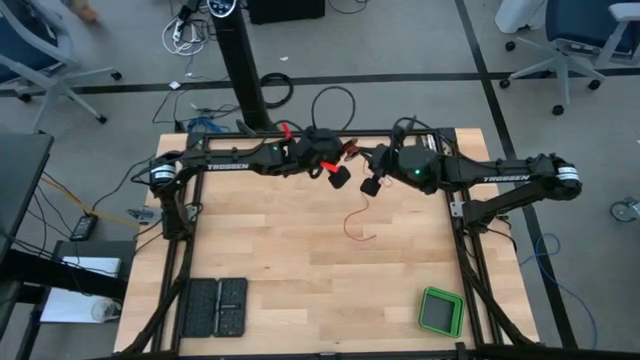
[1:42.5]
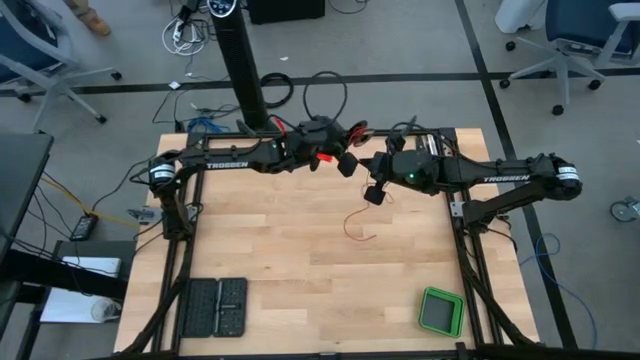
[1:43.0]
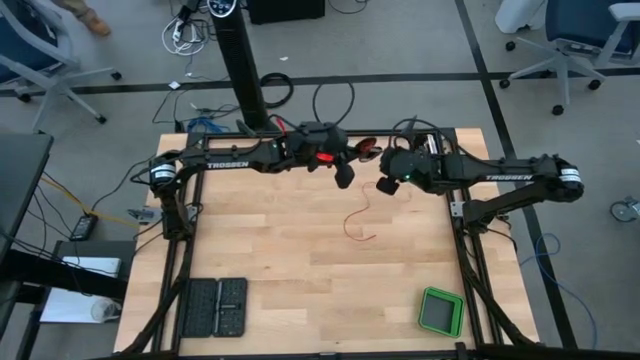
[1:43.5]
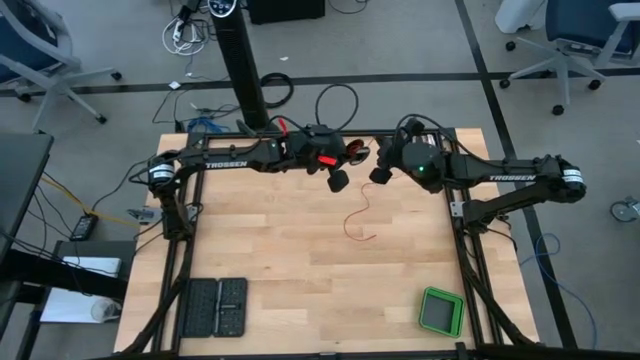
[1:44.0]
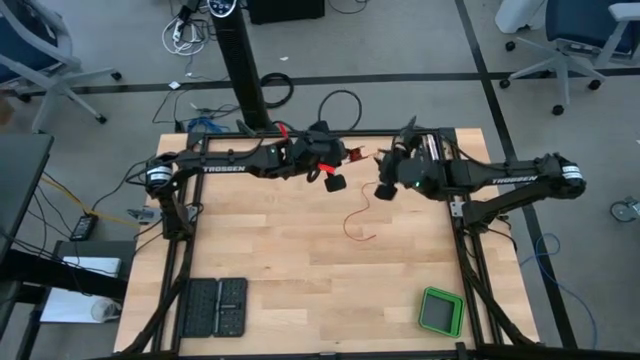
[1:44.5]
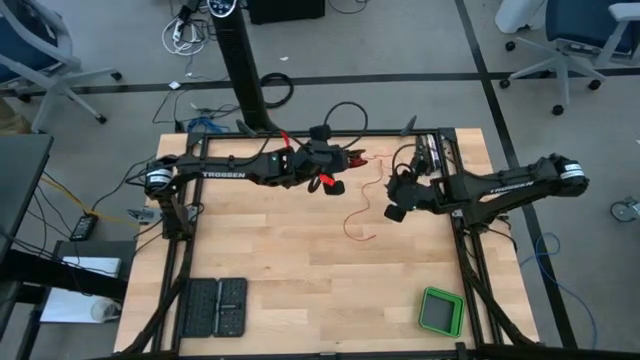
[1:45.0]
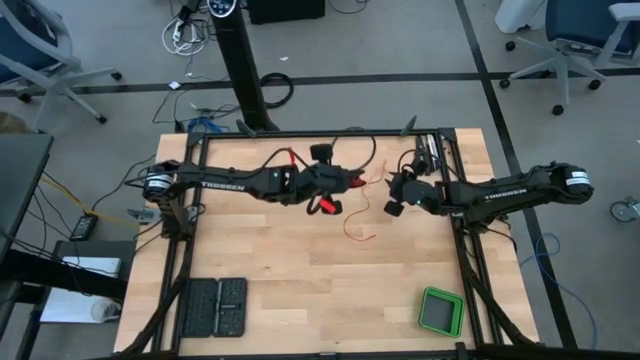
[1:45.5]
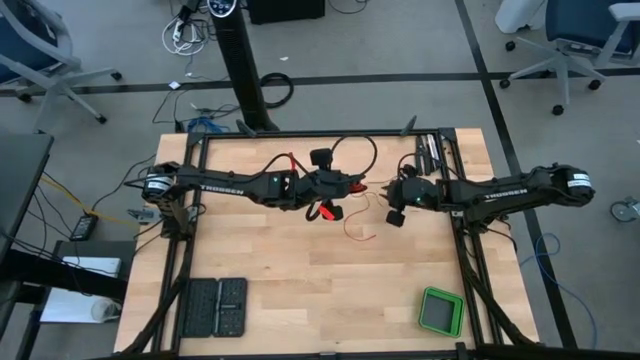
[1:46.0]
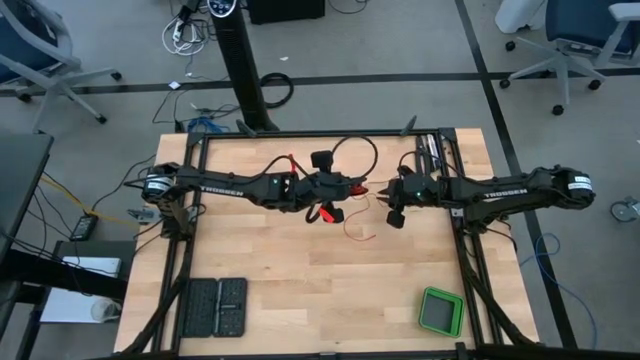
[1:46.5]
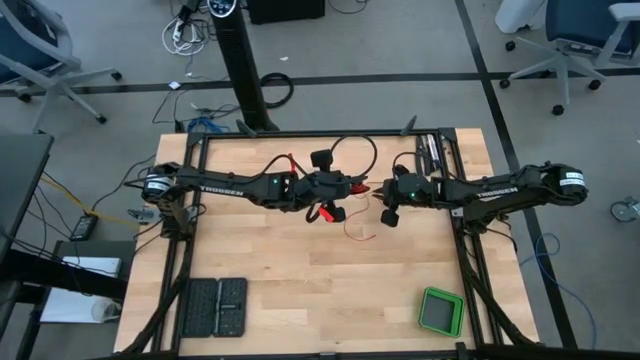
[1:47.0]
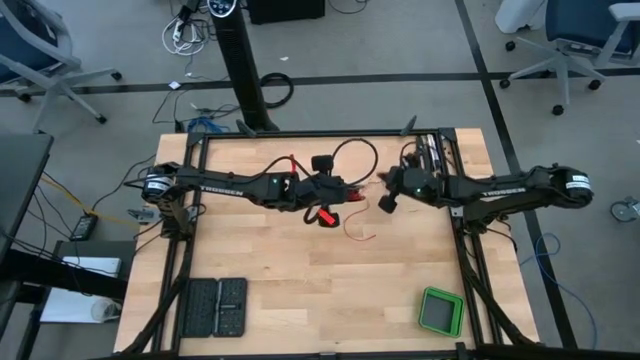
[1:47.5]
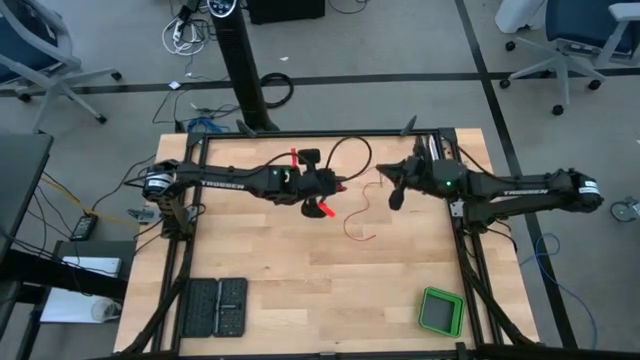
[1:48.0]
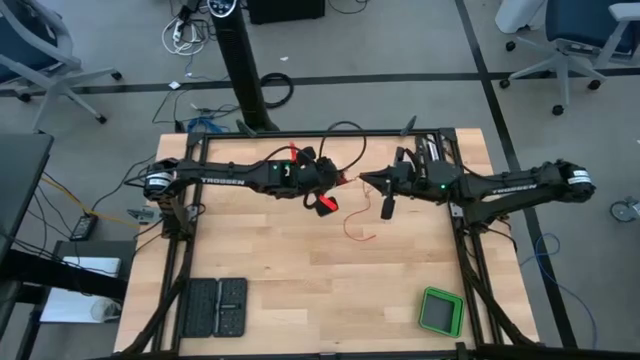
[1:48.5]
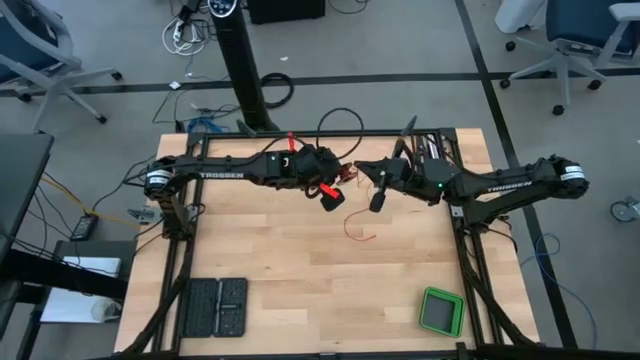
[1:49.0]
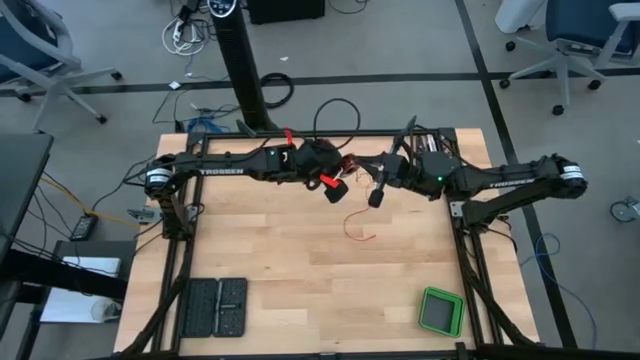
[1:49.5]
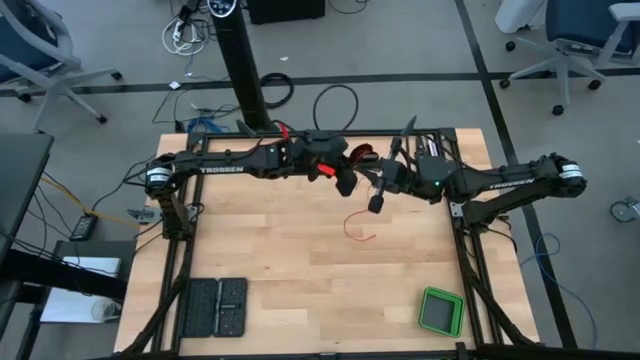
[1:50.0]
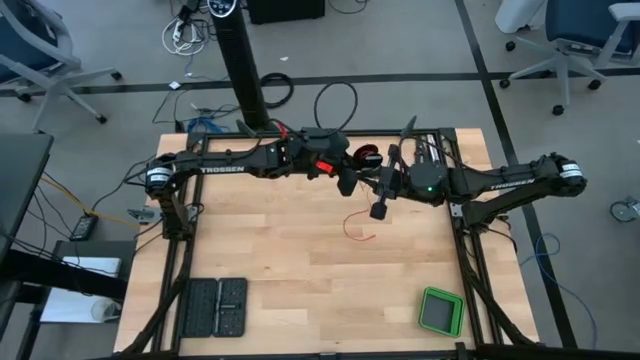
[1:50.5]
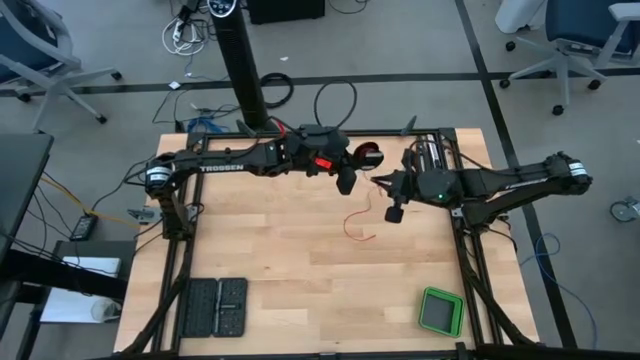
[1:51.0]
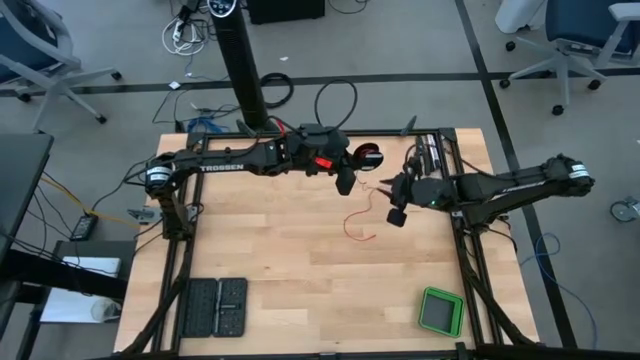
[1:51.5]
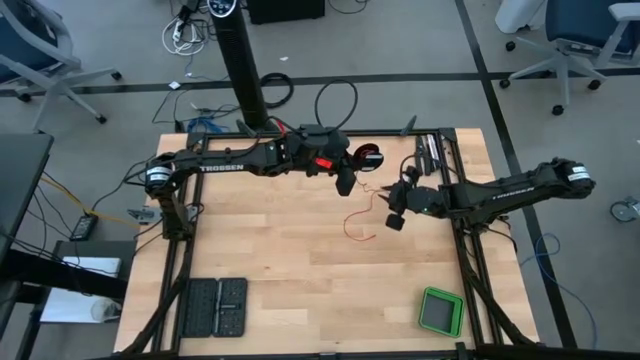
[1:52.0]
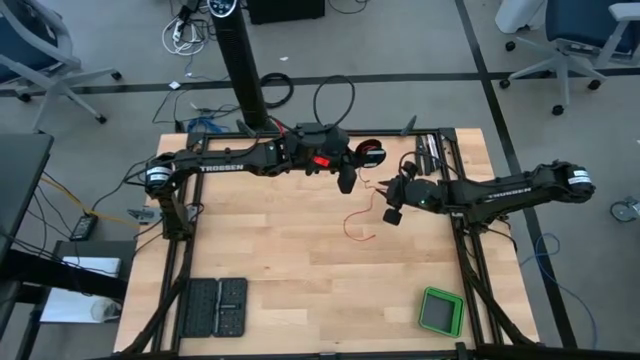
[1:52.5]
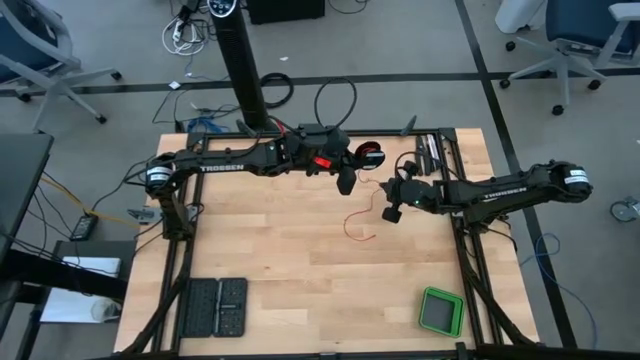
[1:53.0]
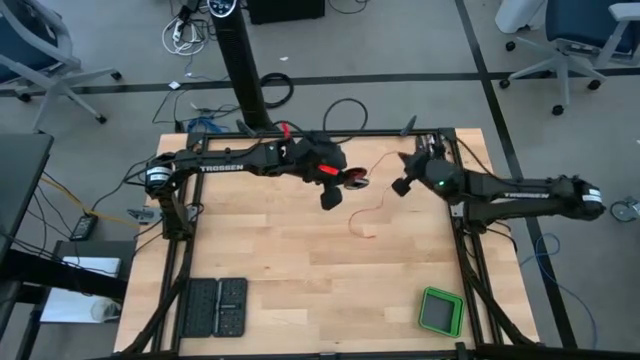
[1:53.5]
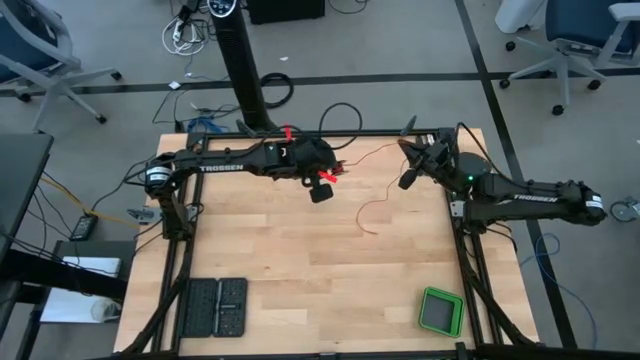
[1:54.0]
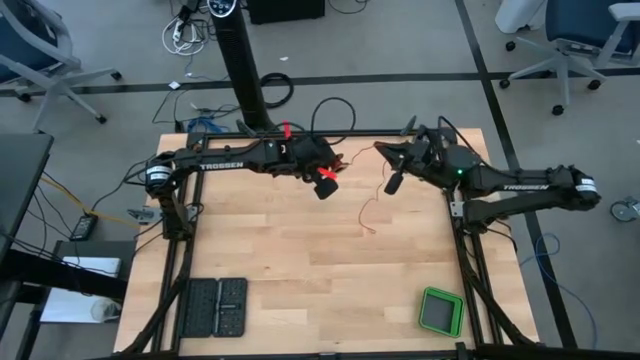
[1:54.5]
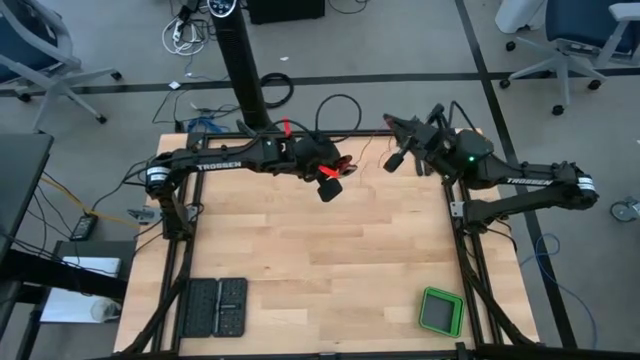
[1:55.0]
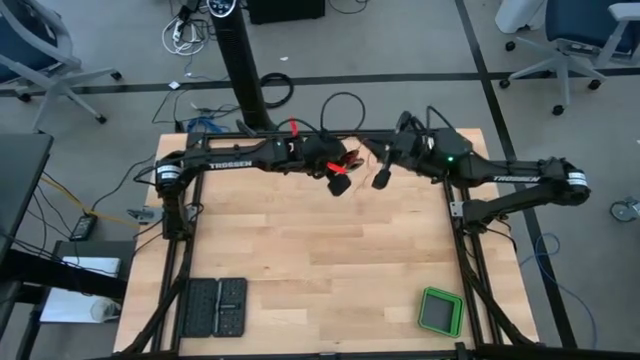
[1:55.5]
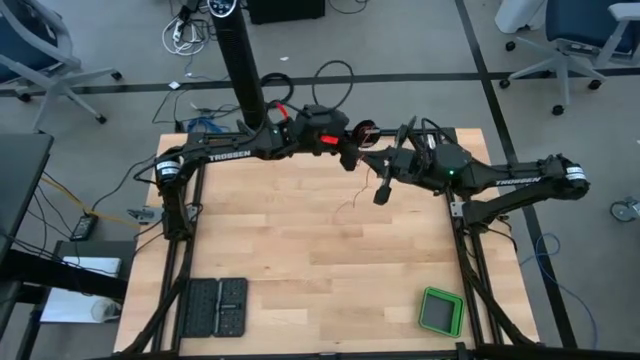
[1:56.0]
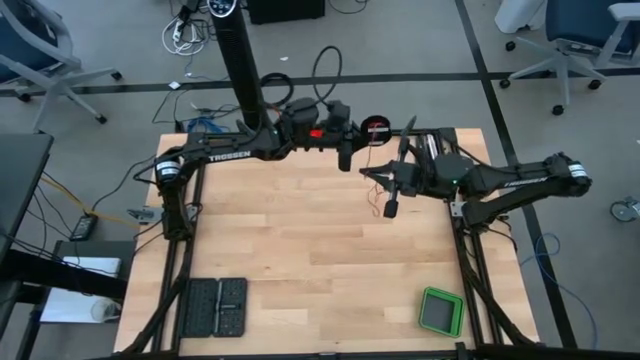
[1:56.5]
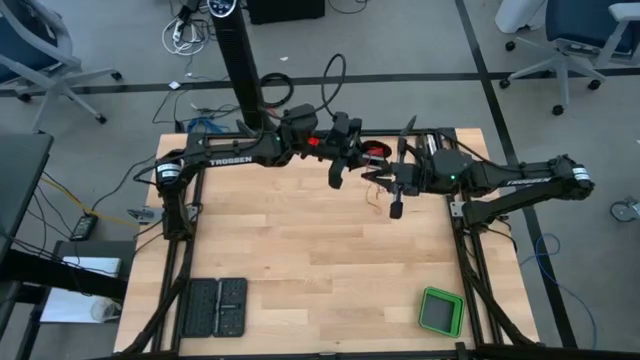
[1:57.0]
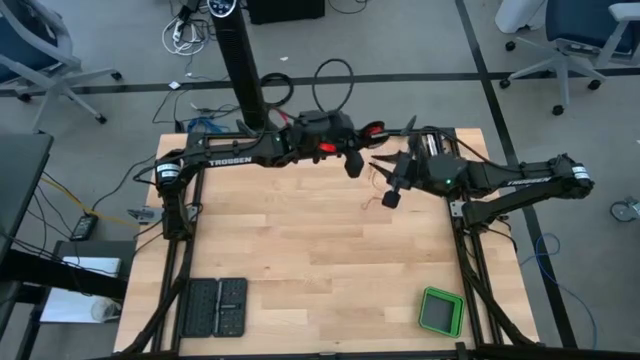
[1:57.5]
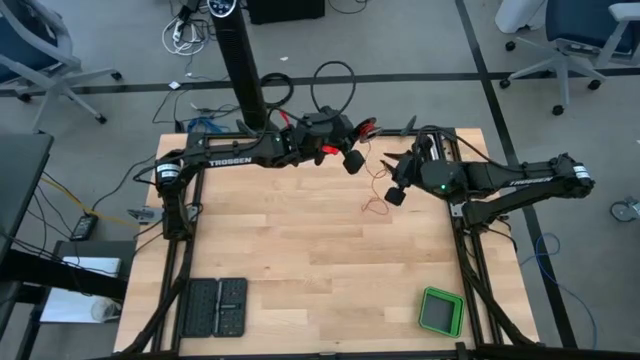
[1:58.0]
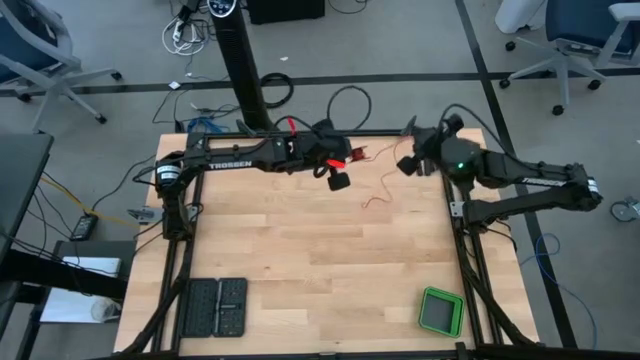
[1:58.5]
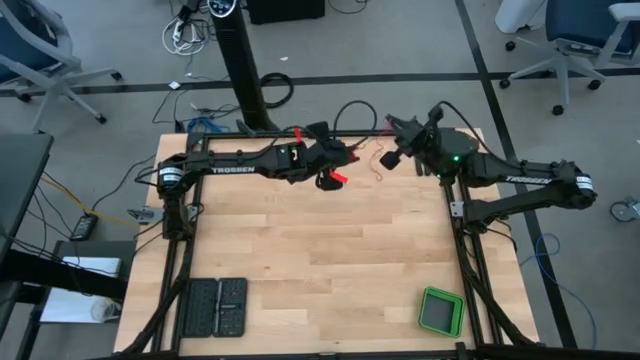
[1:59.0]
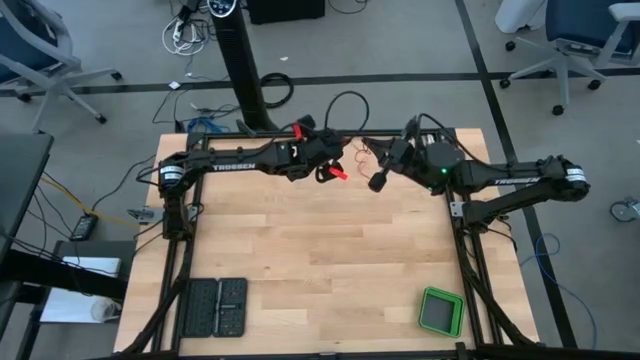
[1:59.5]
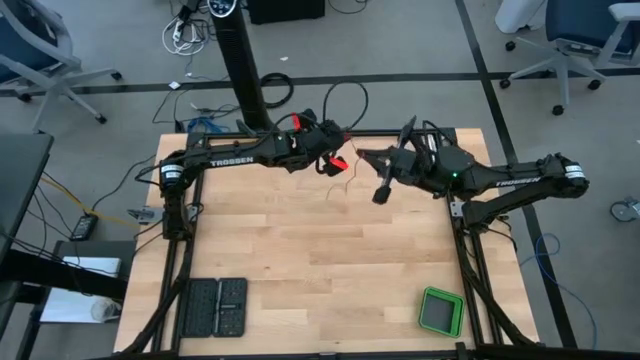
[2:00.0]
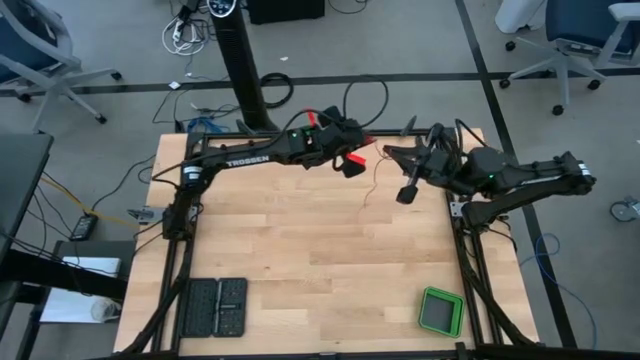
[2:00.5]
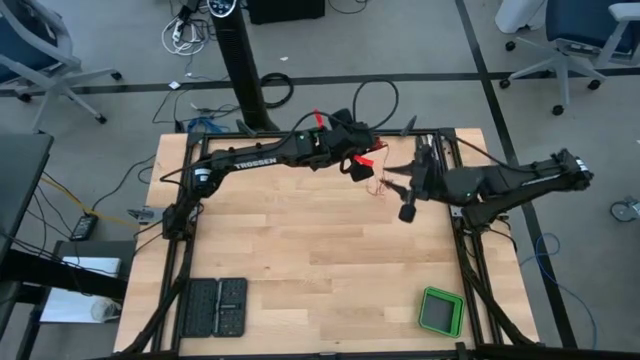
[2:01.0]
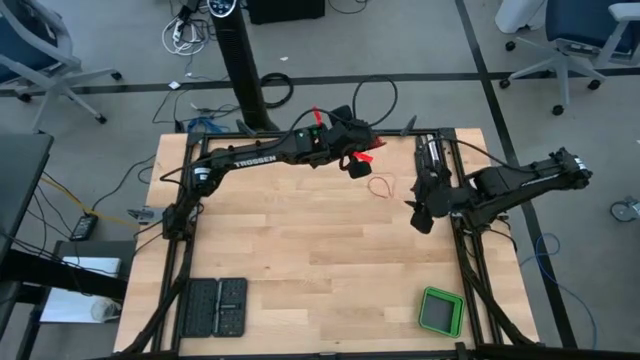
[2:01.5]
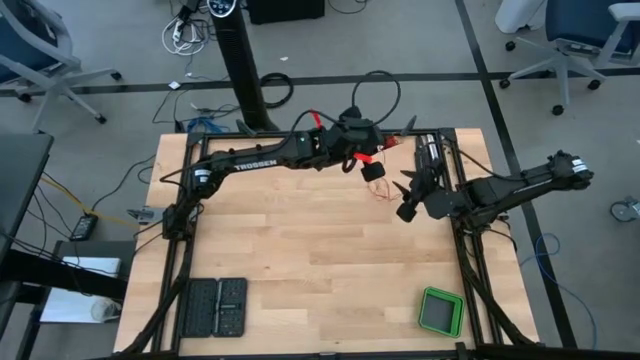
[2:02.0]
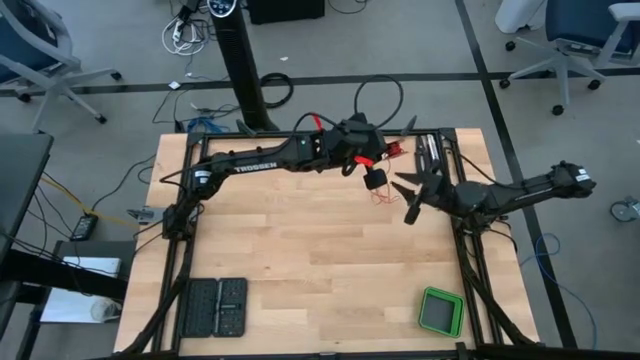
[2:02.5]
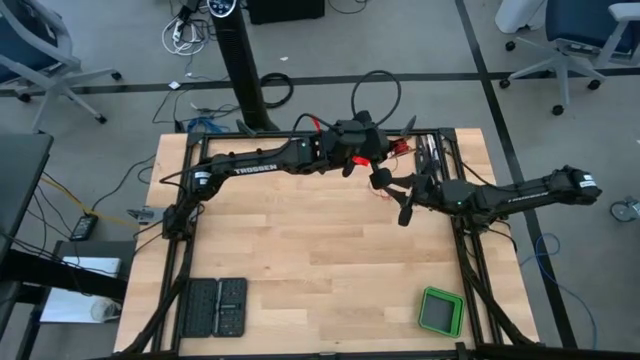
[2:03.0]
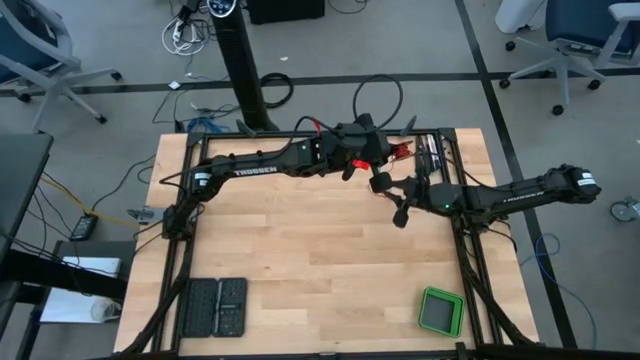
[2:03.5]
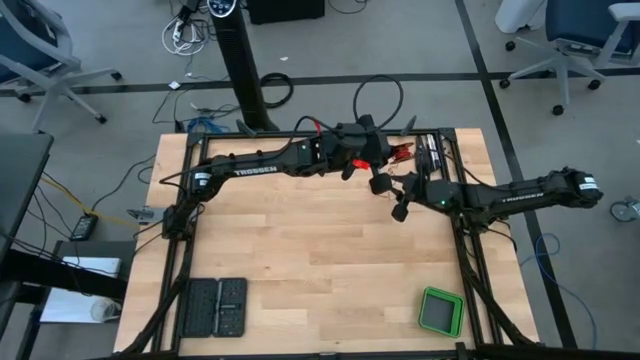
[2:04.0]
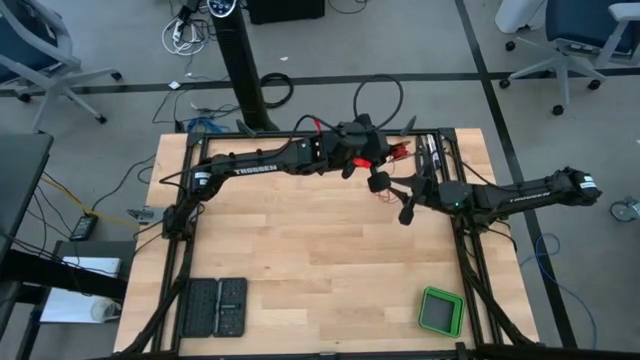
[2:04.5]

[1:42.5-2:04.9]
Task: Coil cords
Coil the red wire cable onto the black spool
